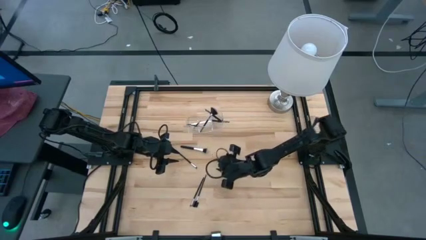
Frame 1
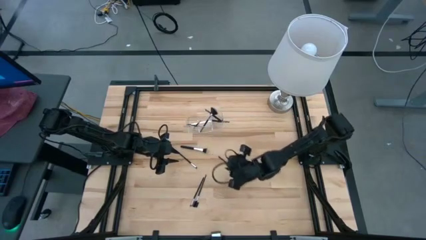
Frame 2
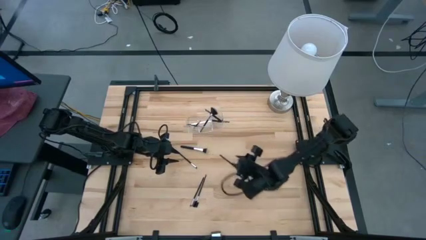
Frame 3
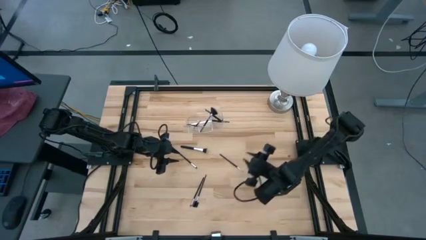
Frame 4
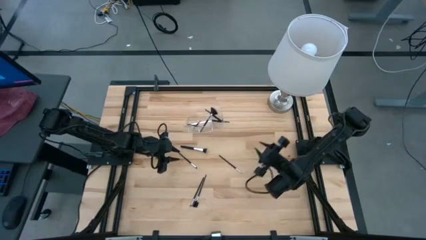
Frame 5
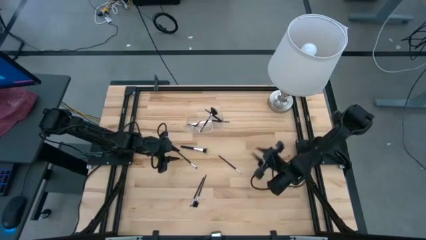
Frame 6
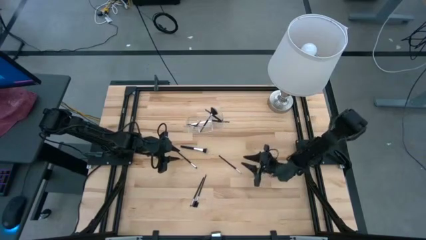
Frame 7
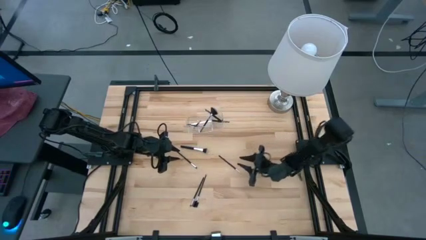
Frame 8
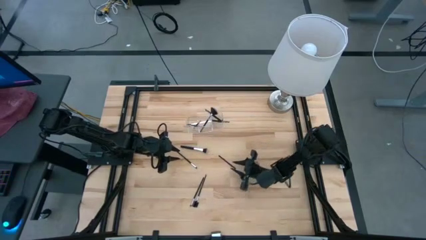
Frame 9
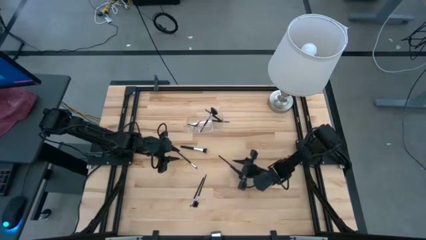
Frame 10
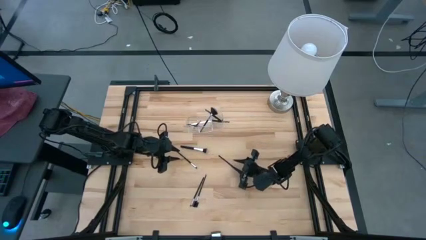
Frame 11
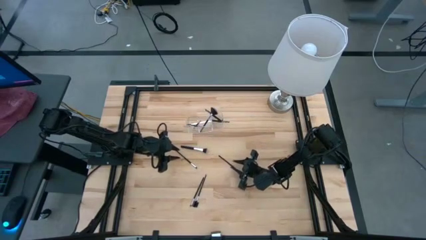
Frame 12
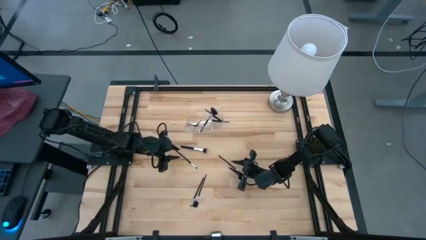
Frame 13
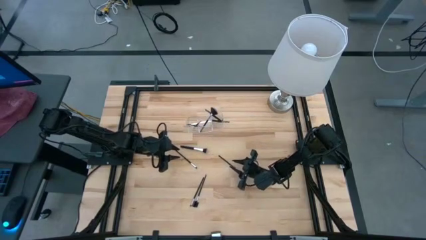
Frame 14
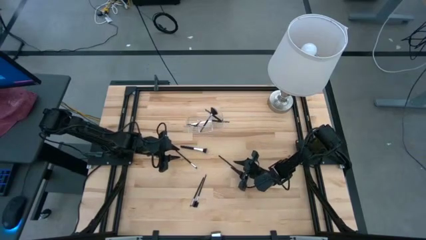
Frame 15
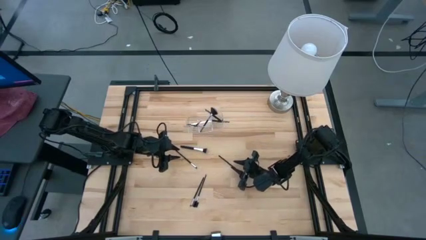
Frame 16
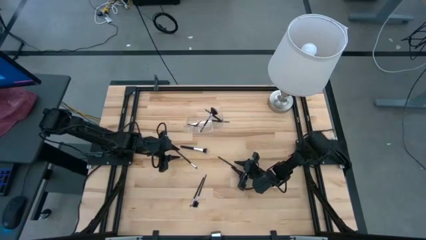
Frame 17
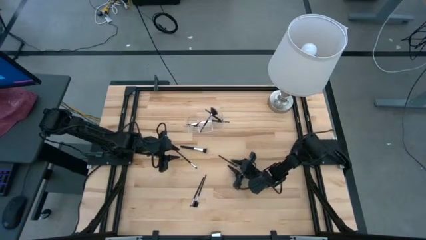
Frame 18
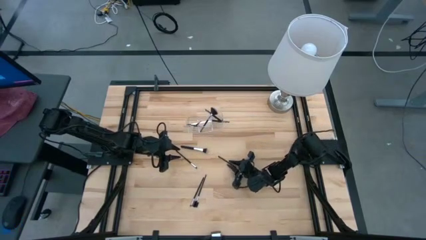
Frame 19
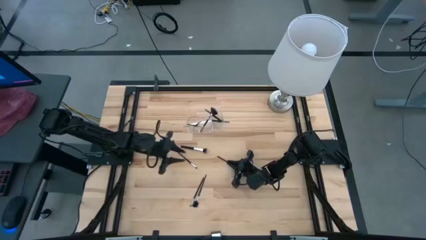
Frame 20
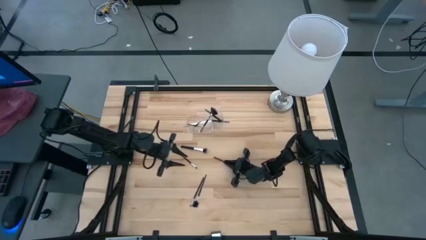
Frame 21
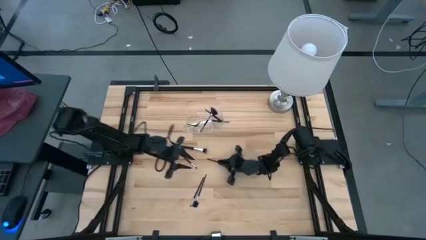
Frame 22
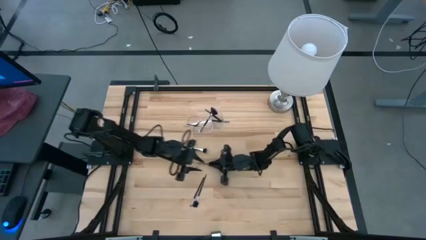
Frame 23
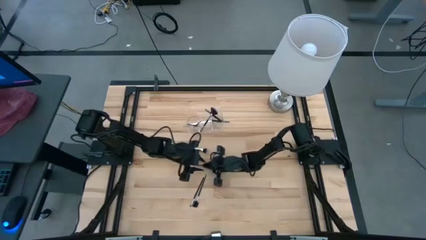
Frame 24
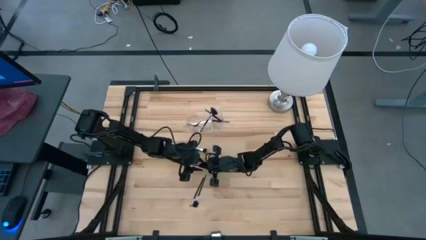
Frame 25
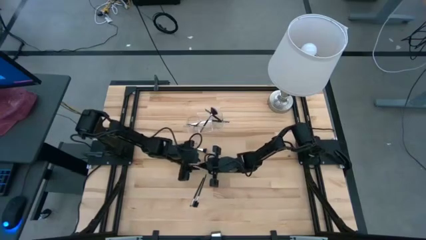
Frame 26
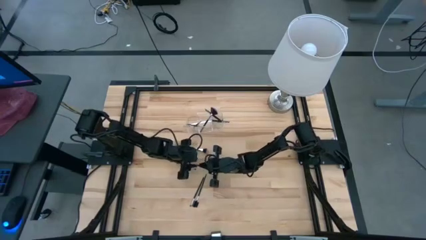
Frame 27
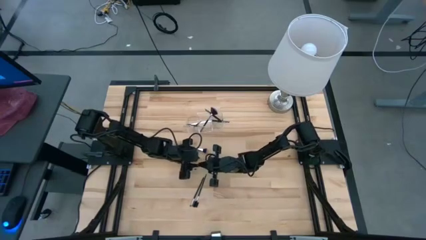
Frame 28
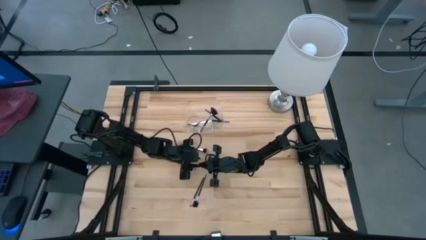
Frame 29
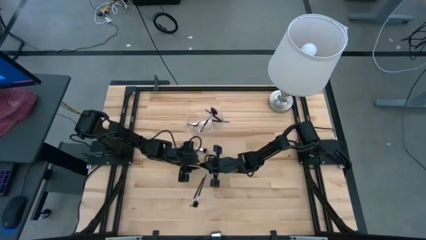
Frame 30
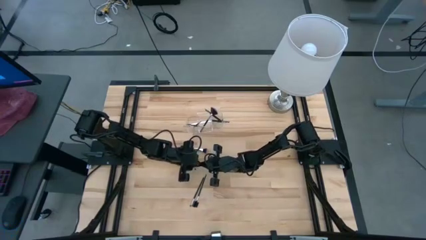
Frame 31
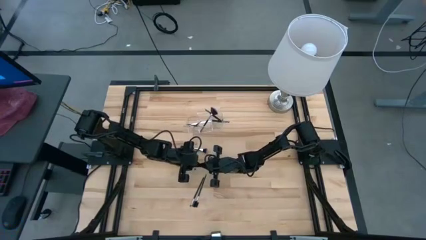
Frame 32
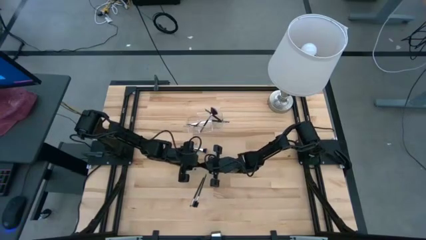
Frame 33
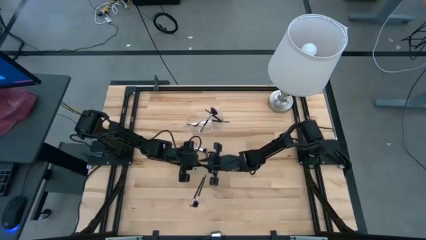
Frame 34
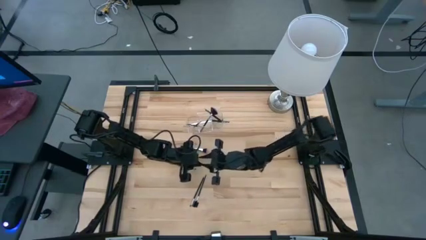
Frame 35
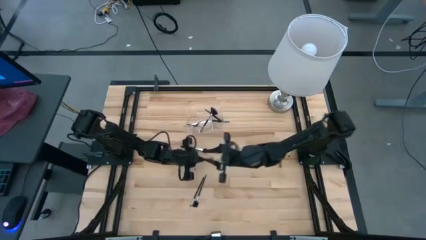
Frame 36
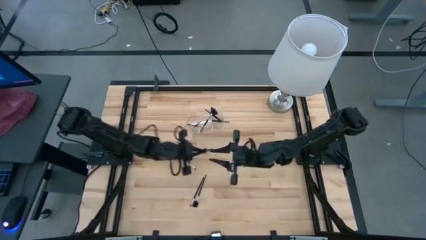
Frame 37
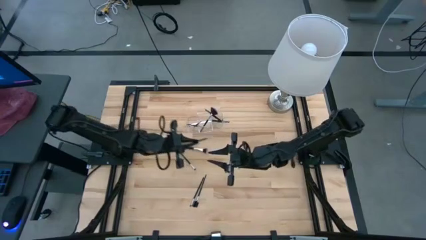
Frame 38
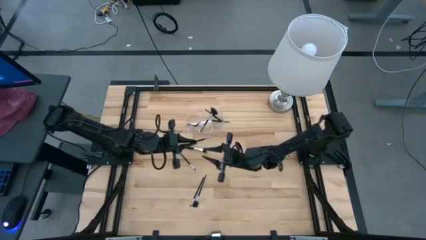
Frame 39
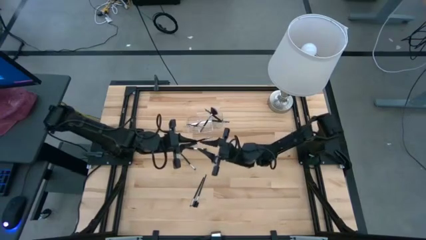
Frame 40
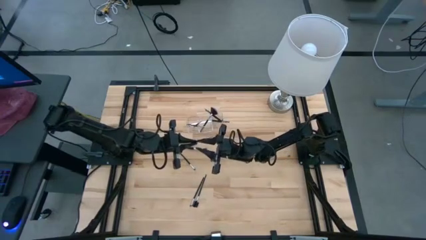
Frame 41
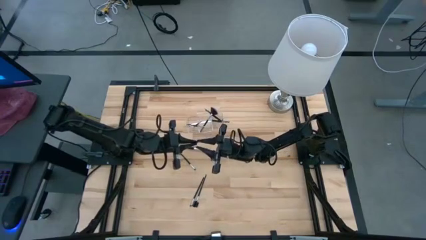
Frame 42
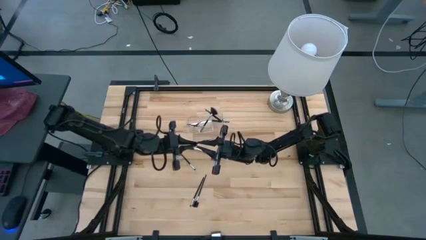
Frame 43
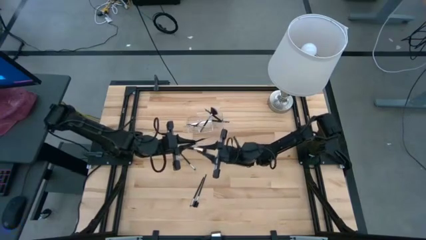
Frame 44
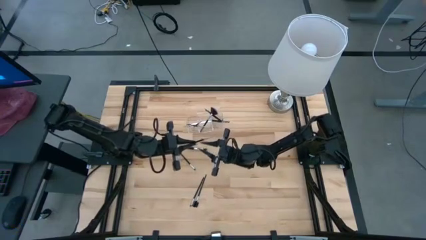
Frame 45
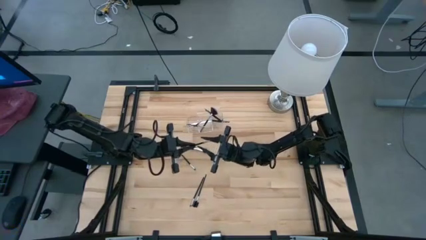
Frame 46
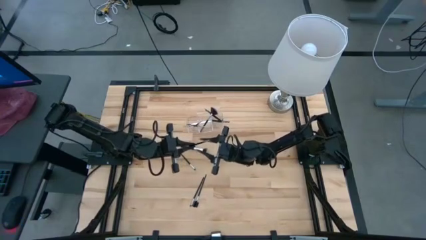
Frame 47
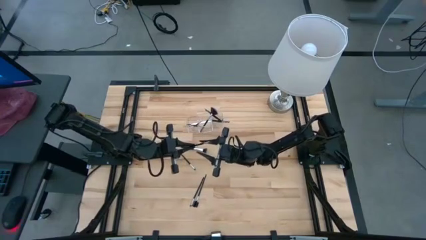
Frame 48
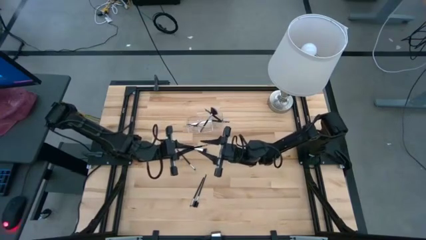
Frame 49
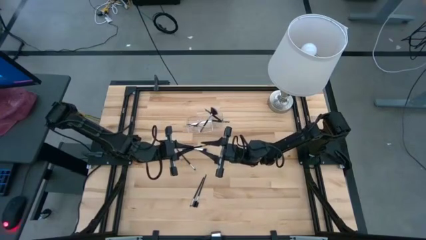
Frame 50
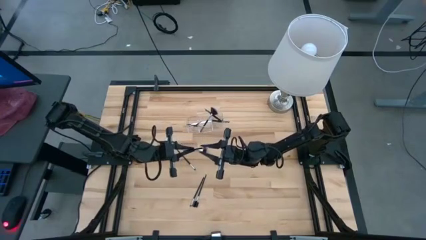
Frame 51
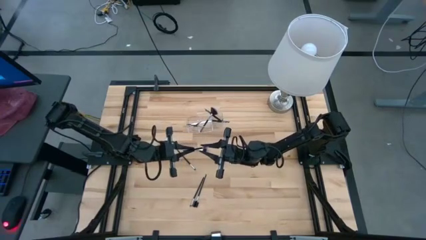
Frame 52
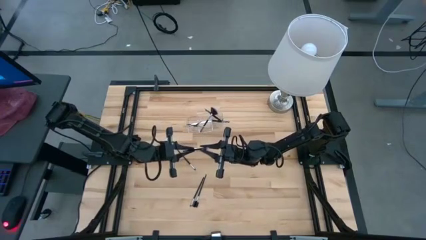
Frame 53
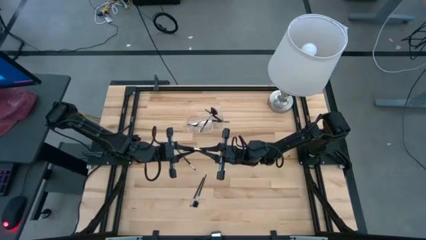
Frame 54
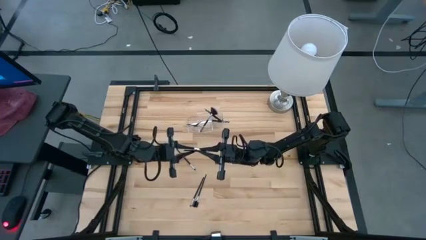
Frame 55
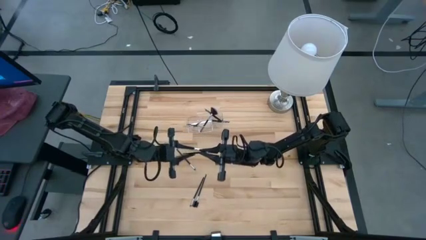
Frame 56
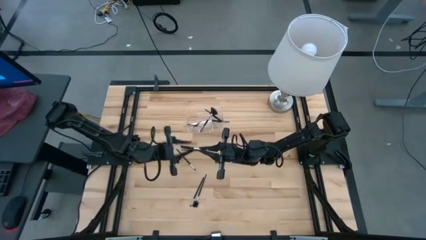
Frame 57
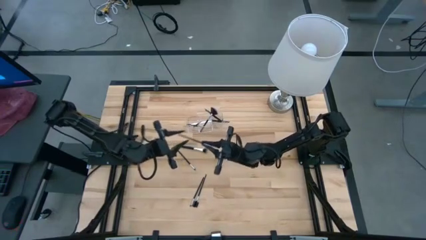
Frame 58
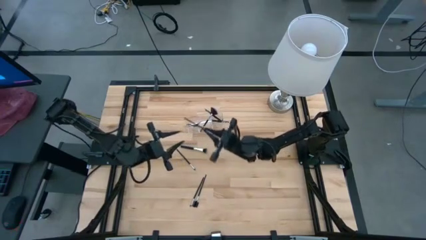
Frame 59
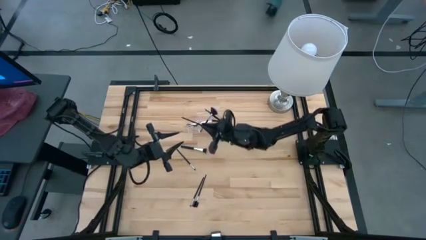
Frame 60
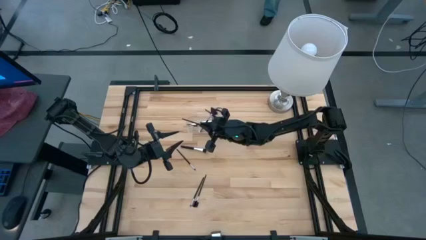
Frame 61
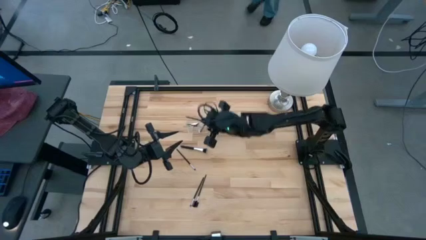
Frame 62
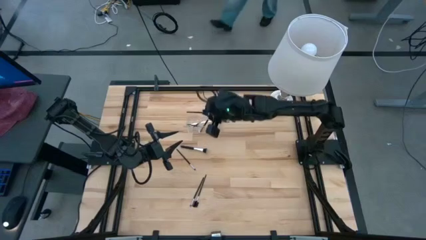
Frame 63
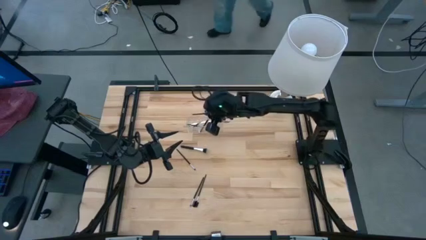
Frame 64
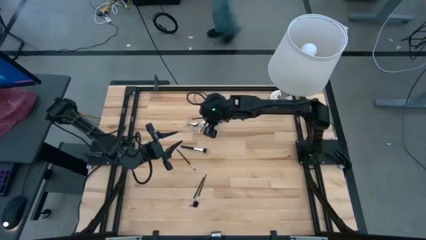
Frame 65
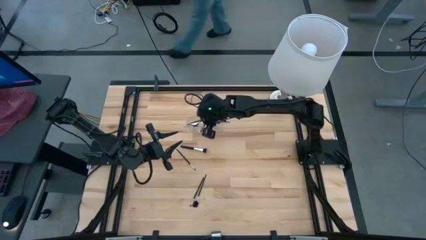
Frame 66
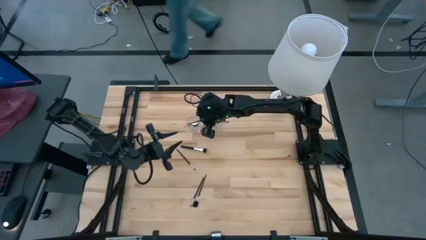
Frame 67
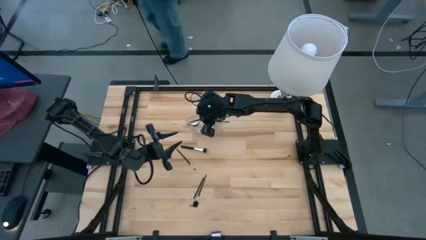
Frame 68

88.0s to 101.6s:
Task: Put items in baskets/containers
Put the black liner brush into the transparent organizer
